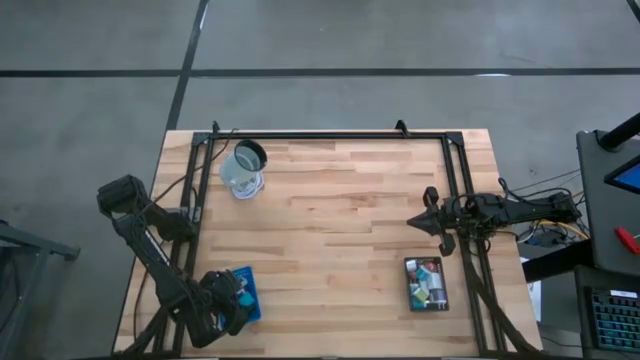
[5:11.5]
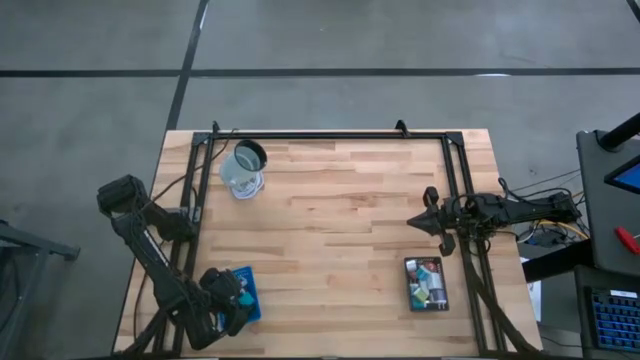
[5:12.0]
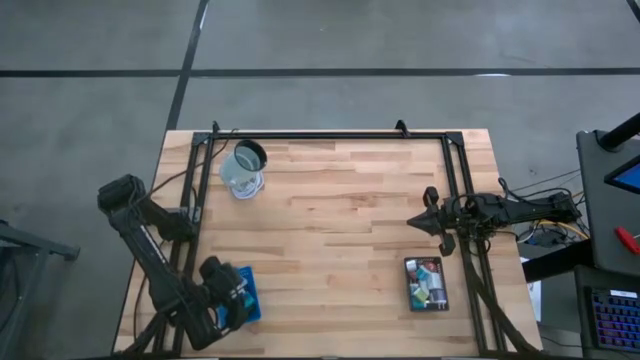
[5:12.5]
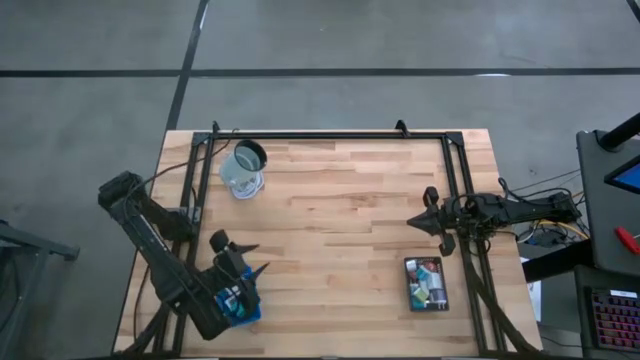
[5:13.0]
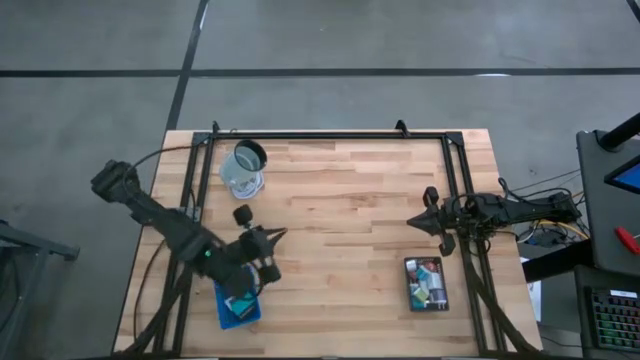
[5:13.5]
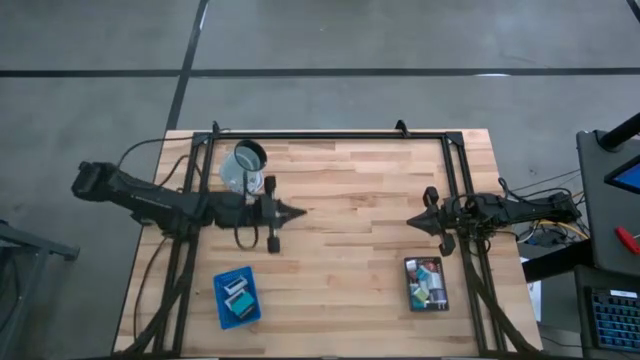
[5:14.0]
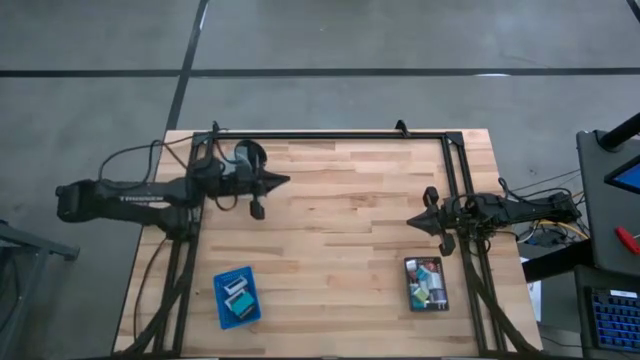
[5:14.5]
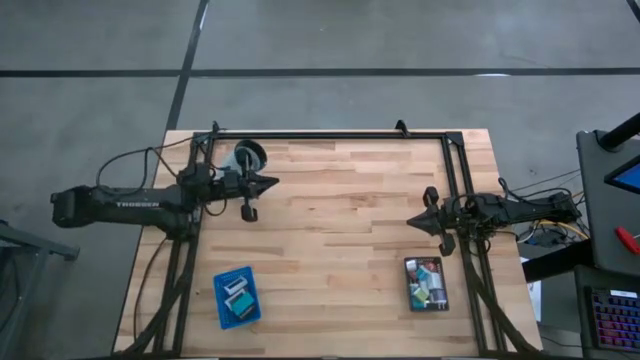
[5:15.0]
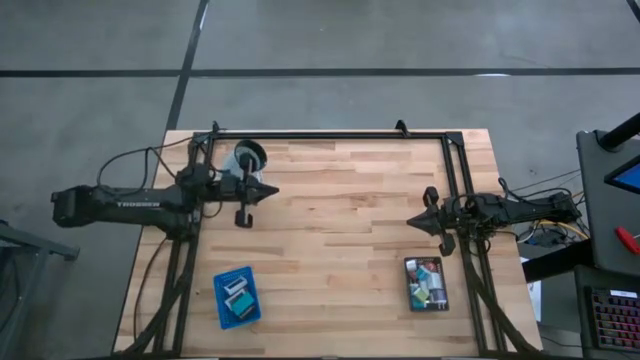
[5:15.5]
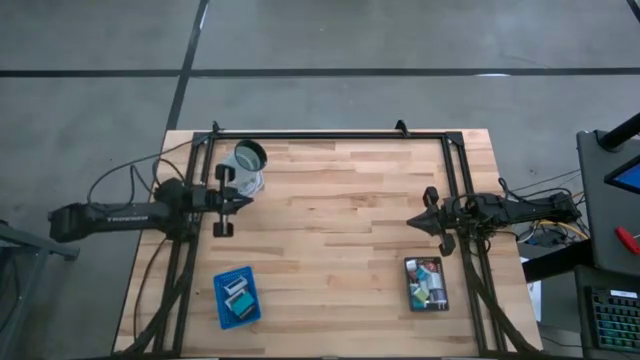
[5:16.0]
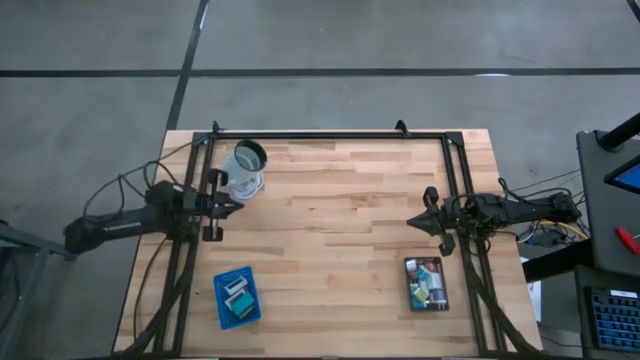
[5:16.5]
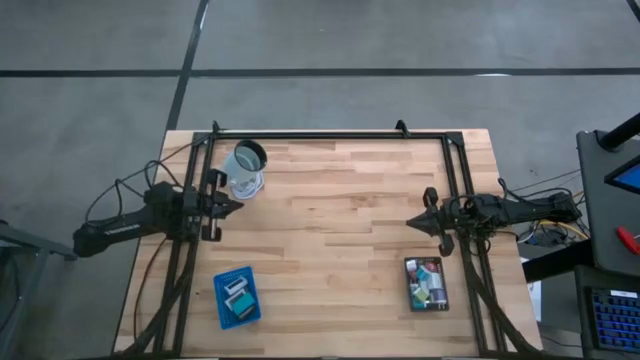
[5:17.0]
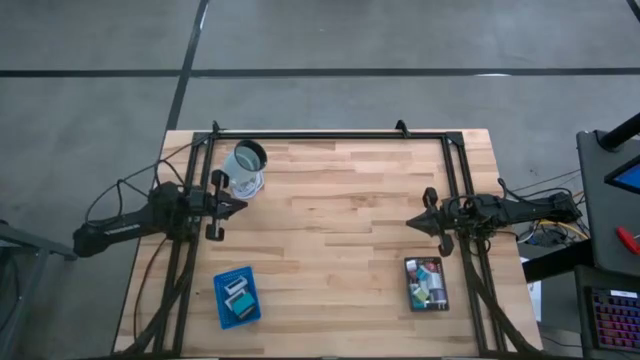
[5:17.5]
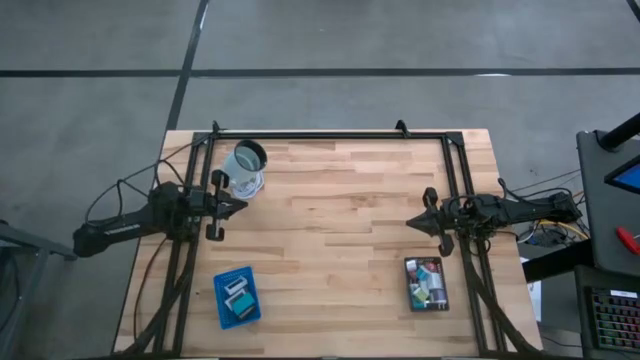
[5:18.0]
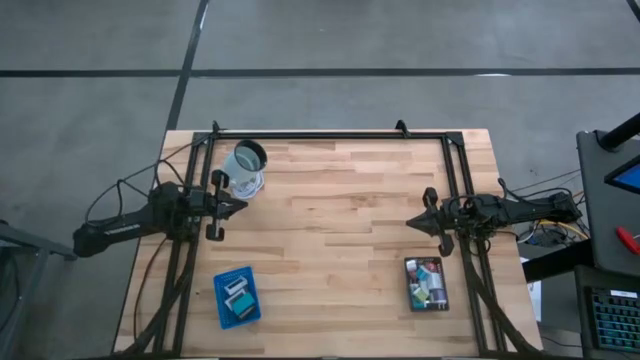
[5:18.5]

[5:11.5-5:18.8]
Task: Pick & Place Office items
Return to Home Position

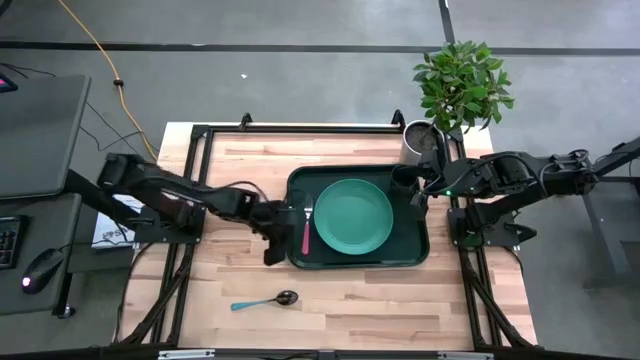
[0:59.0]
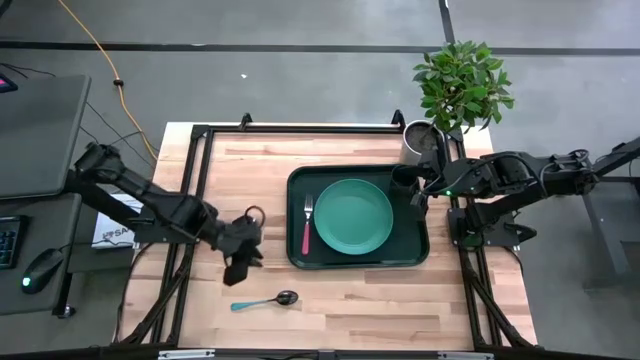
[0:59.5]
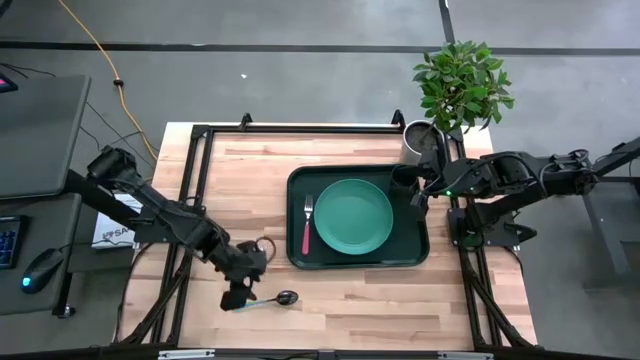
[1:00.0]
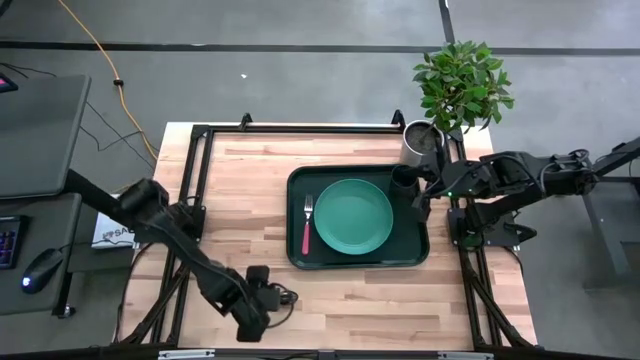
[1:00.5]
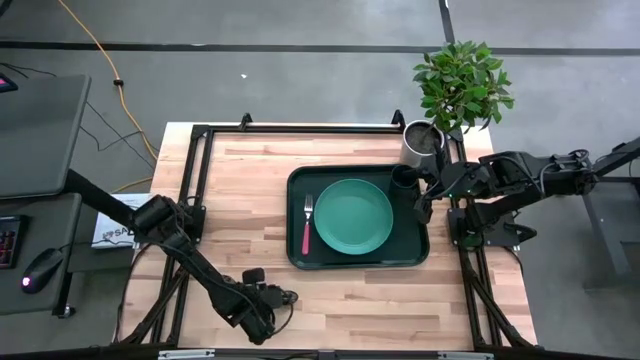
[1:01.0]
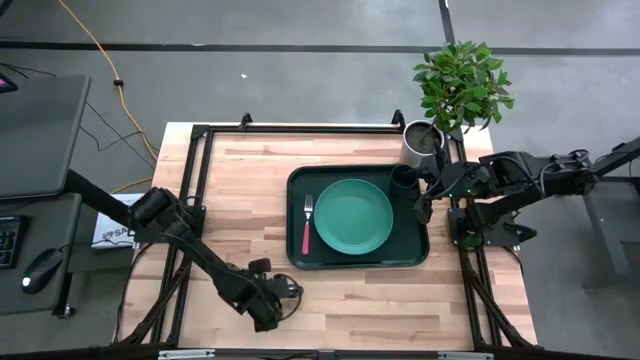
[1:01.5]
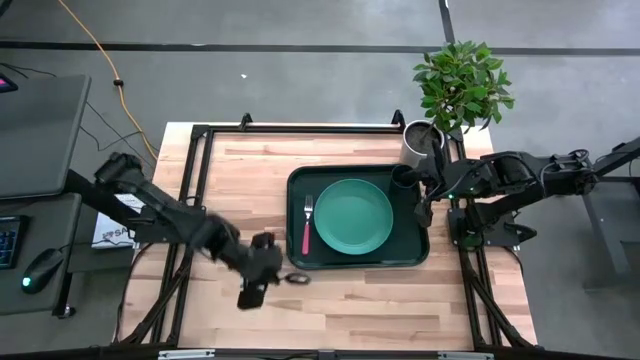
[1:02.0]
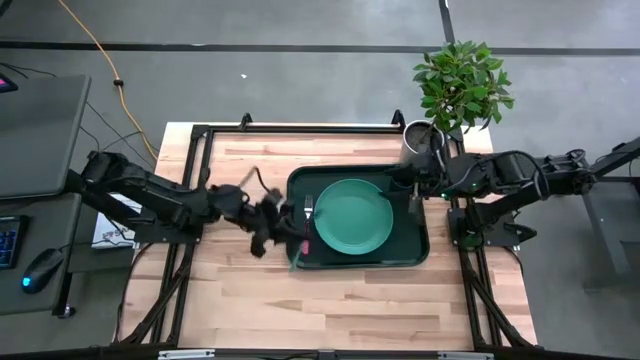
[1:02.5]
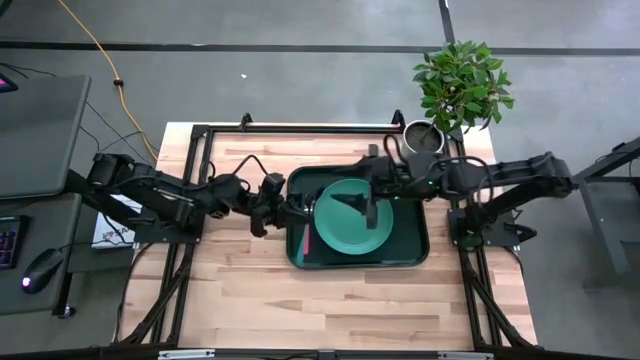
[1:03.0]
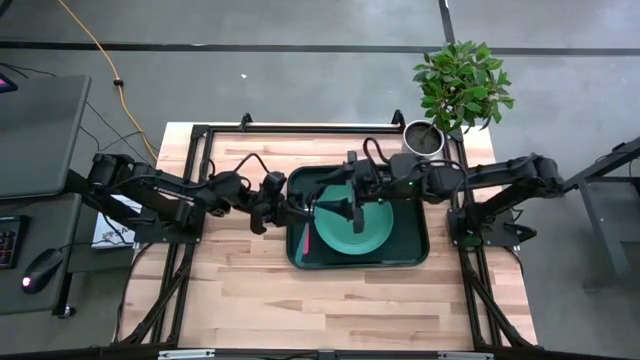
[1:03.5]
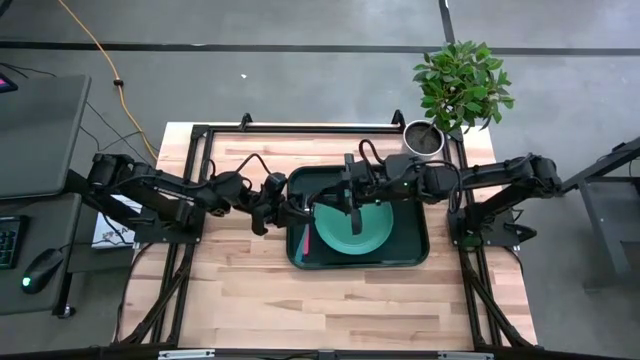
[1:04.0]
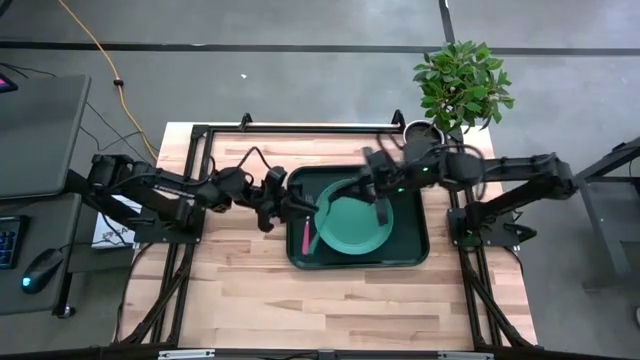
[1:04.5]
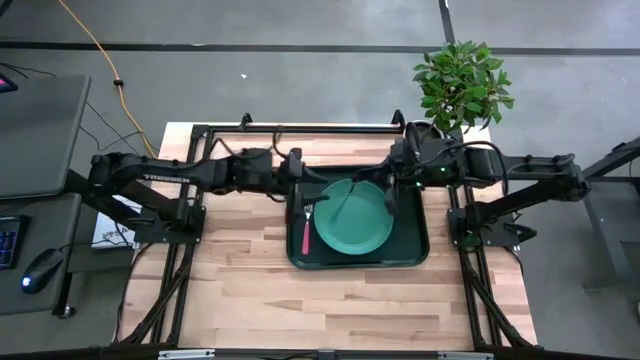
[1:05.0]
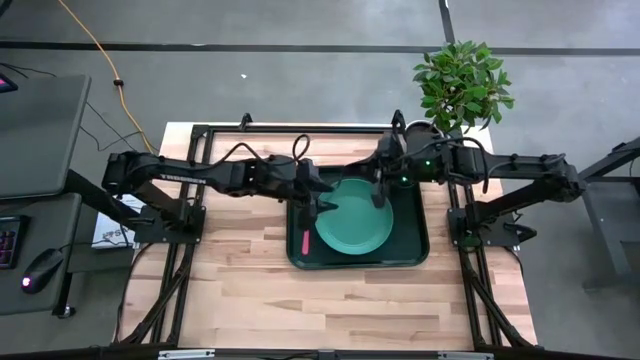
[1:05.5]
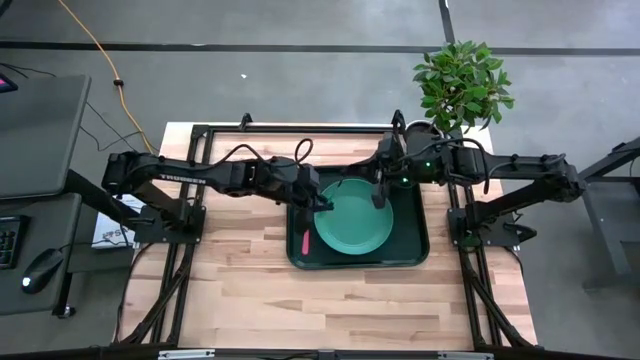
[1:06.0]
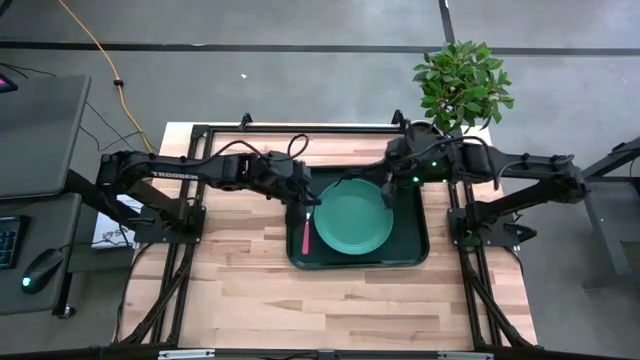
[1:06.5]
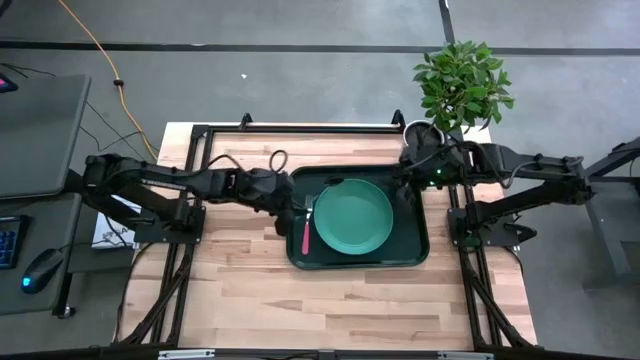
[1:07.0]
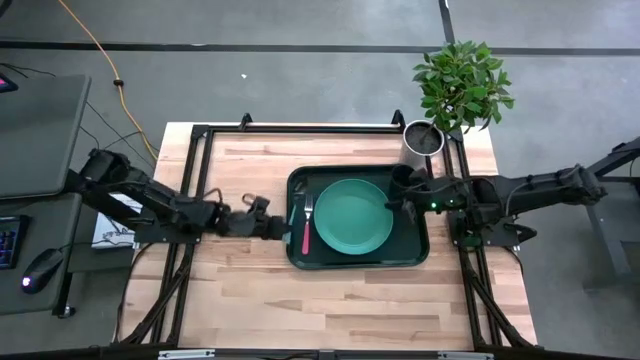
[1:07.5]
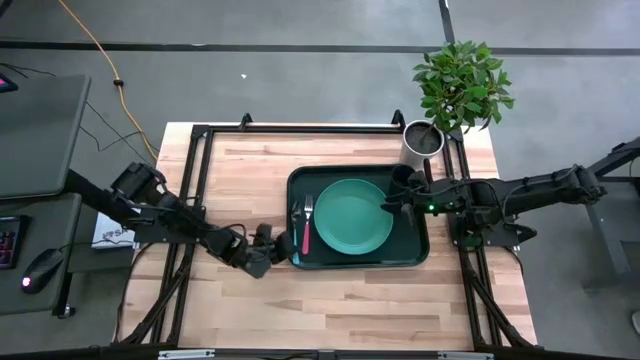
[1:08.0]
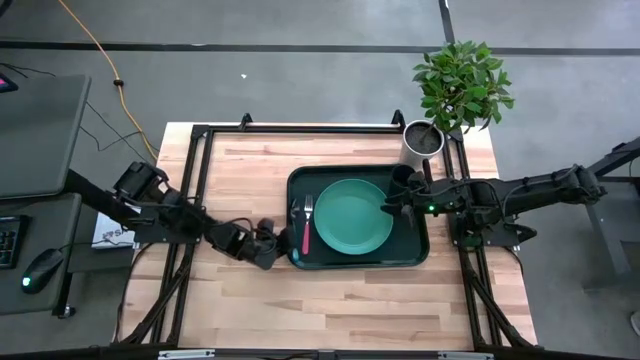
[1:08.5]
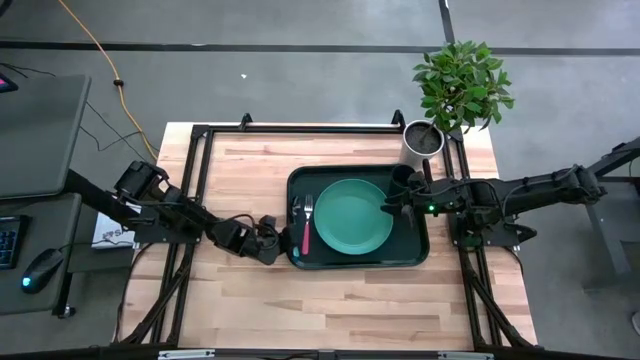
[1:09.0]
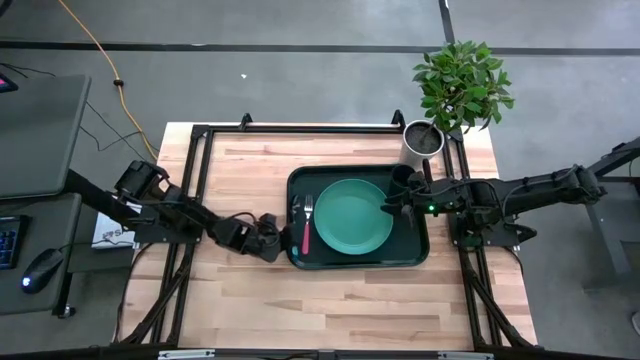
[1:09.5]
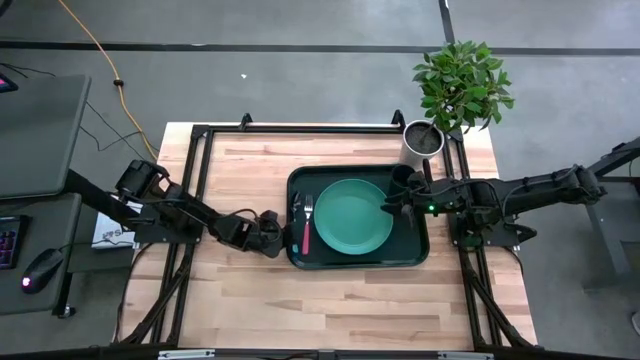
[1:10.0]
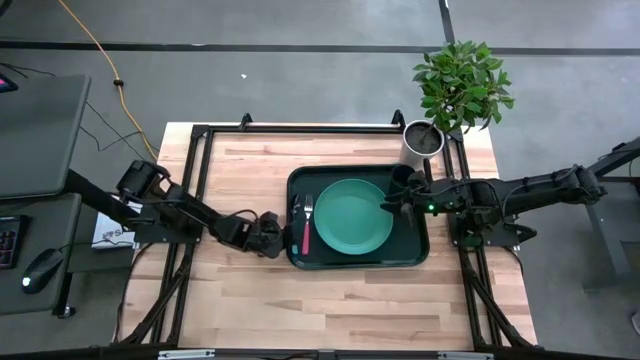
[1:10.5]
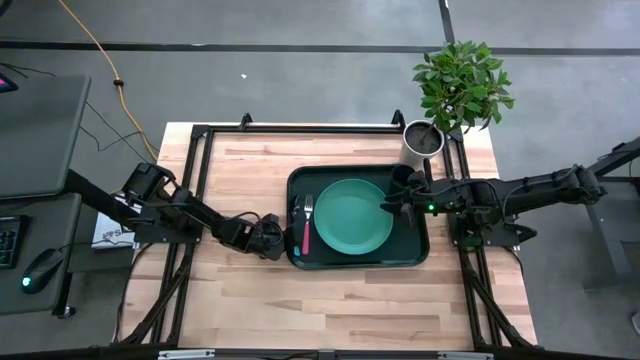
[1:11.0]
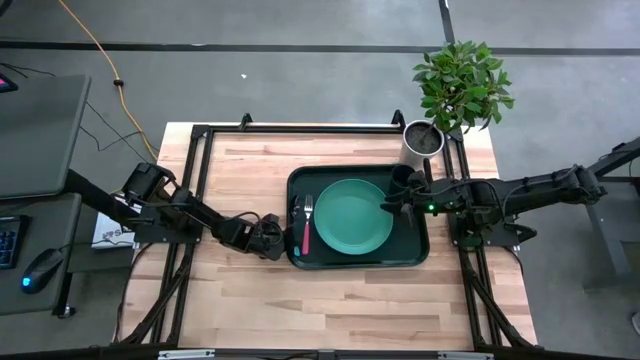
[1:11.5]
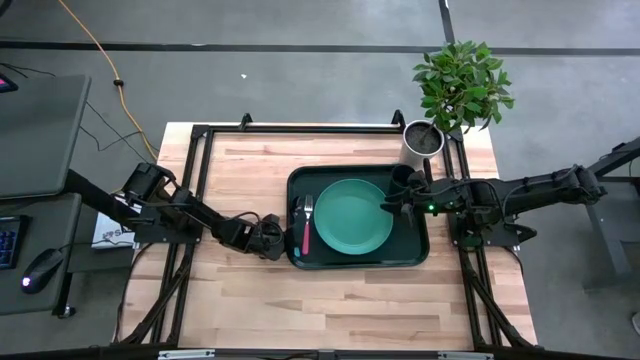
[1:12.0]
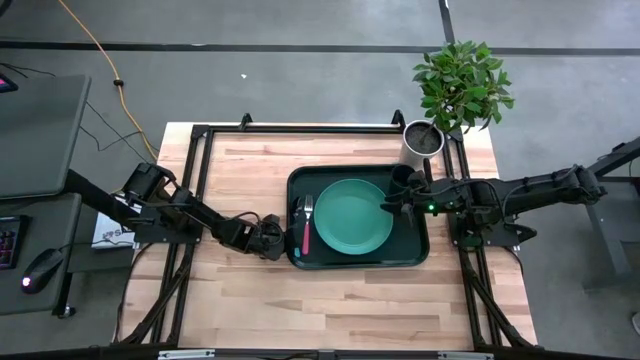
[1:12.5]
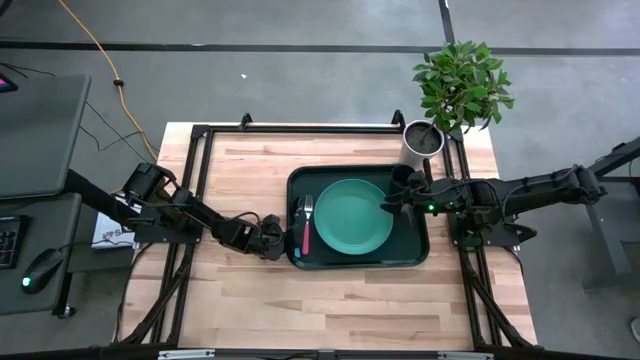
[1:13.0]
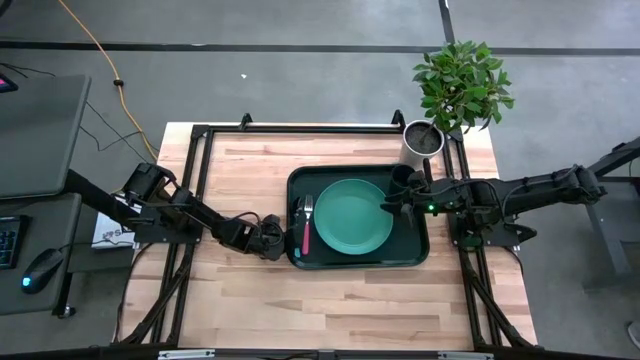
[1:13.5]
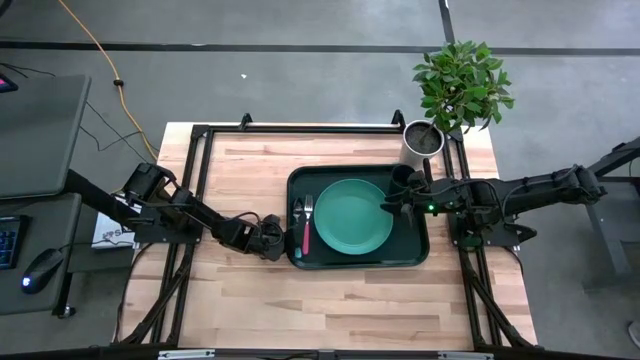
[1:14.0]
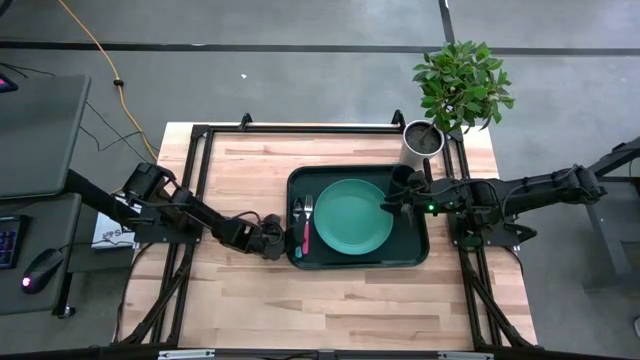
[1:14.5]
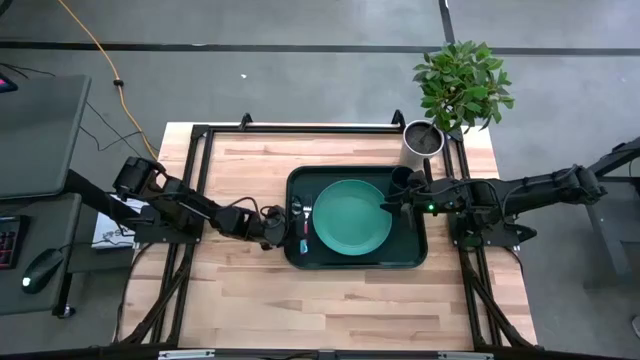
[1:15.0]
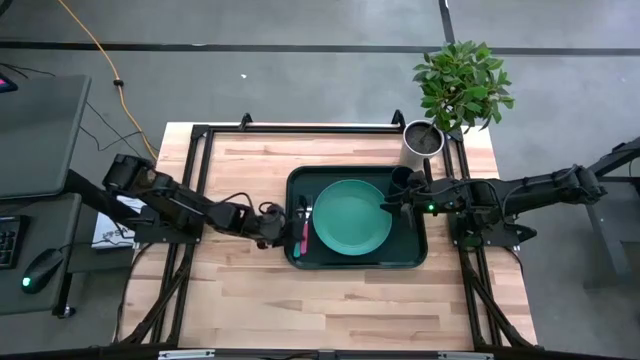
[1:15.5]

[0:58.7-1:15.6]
Task: Pick and place plate/cup/fork/spoon on tray
Put the blue spoon on the green serving tray
